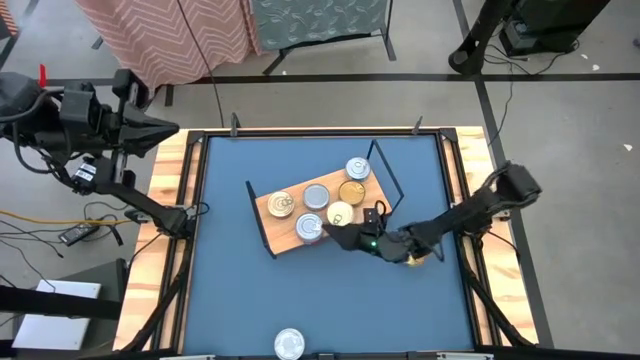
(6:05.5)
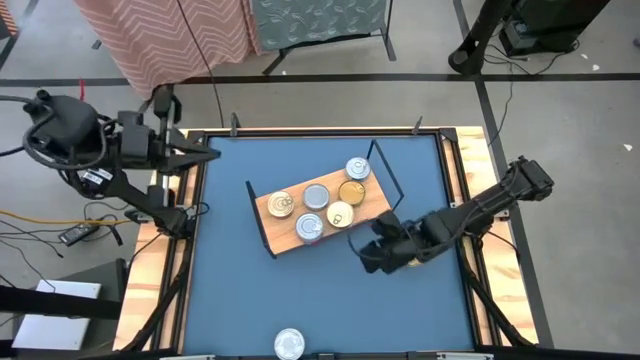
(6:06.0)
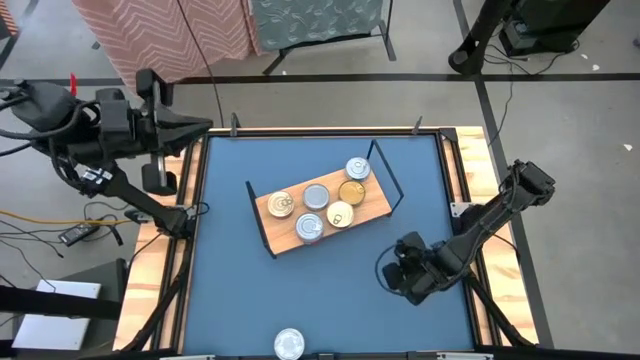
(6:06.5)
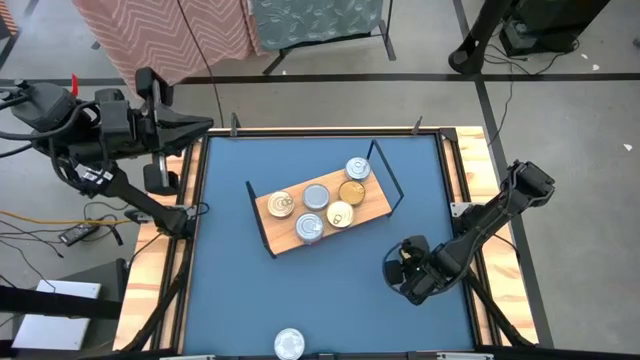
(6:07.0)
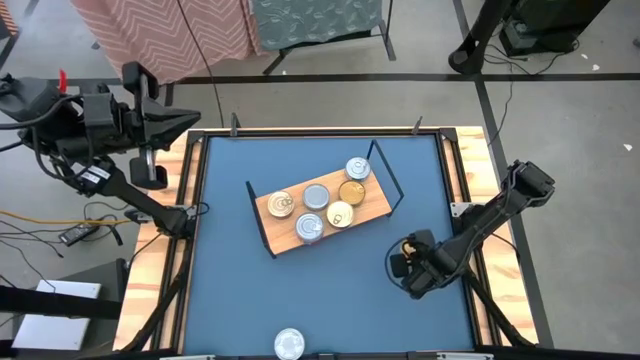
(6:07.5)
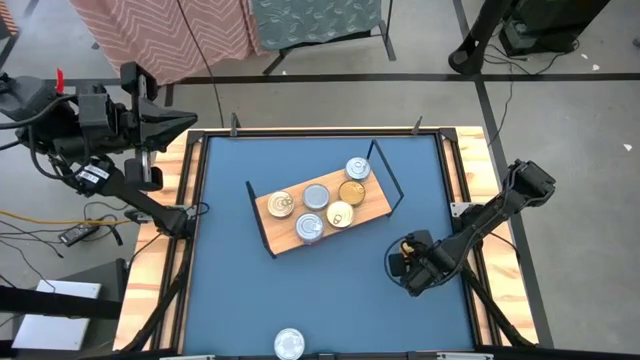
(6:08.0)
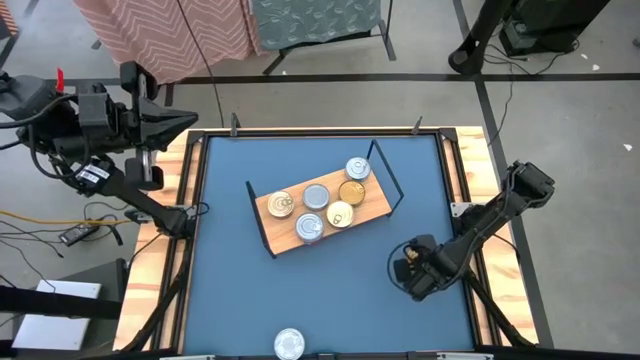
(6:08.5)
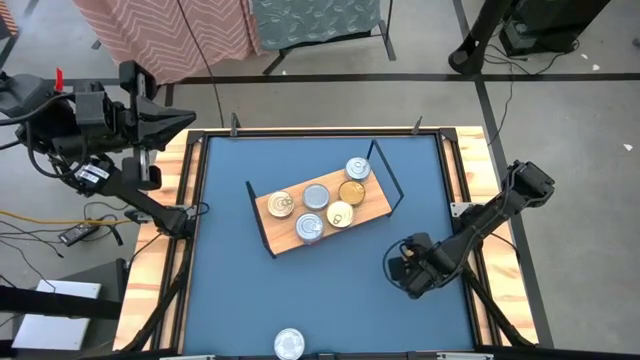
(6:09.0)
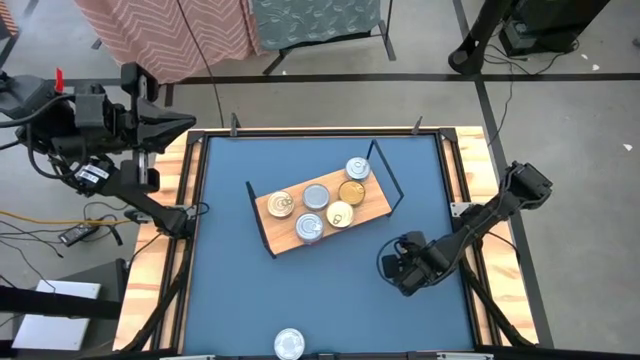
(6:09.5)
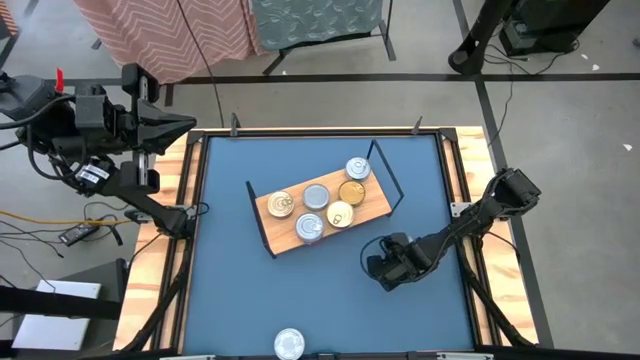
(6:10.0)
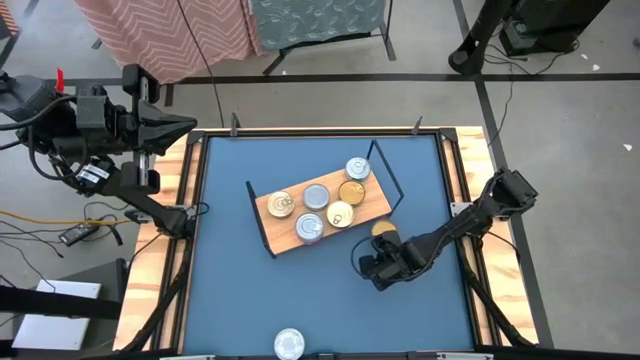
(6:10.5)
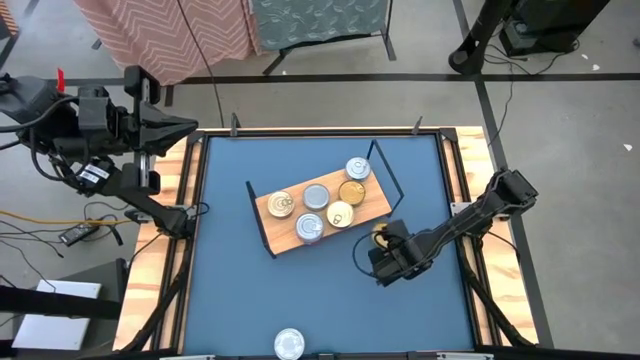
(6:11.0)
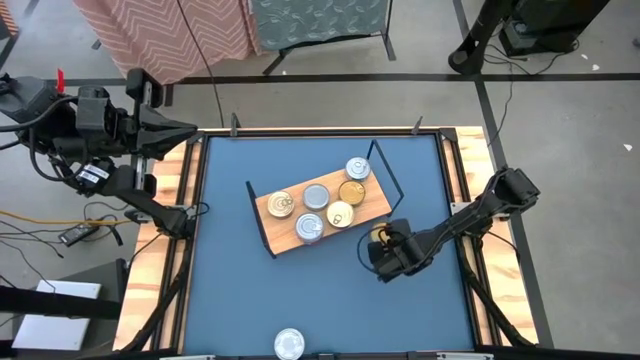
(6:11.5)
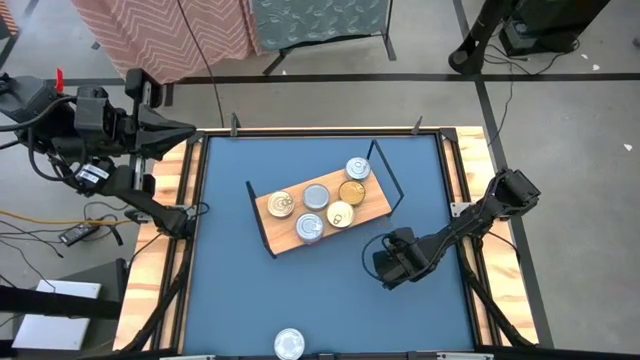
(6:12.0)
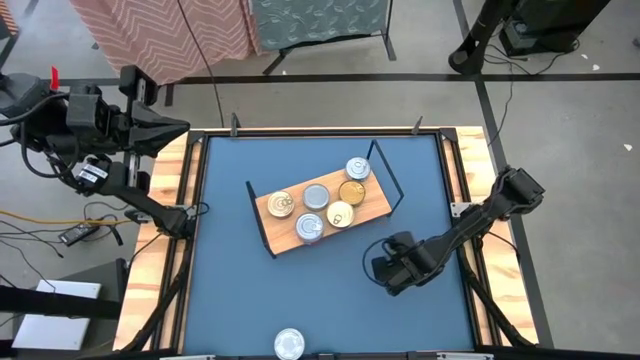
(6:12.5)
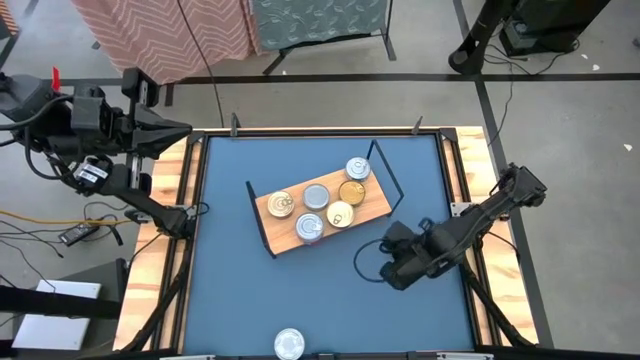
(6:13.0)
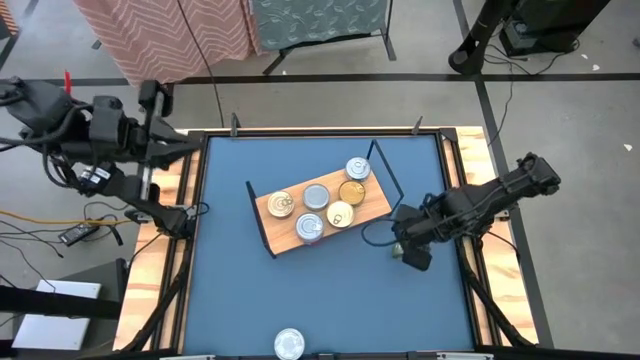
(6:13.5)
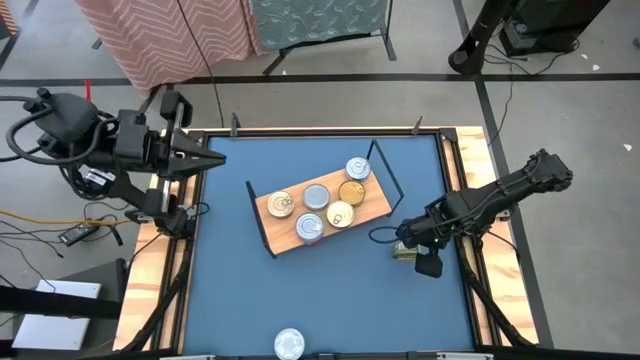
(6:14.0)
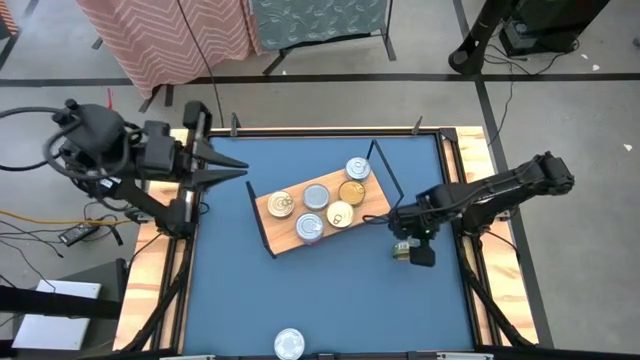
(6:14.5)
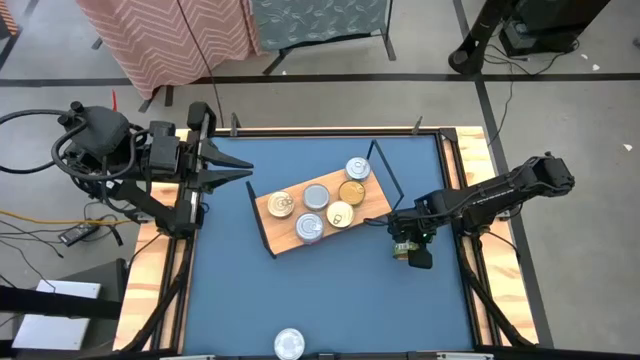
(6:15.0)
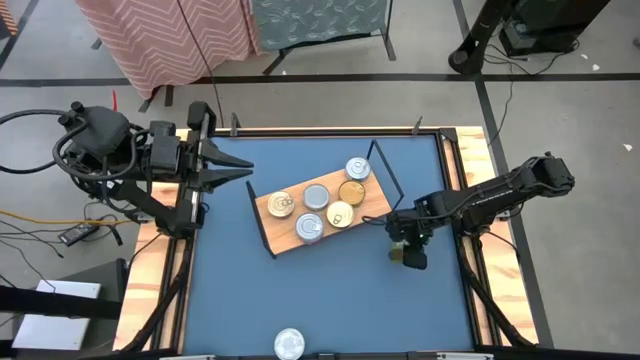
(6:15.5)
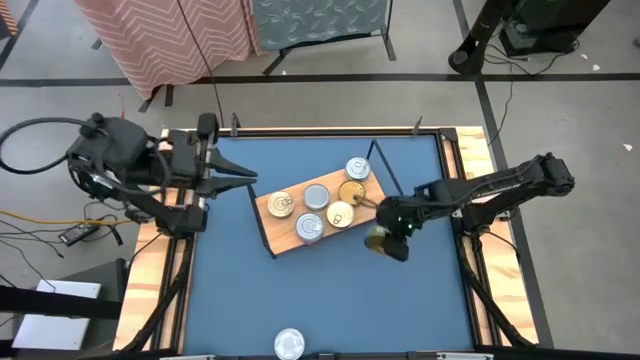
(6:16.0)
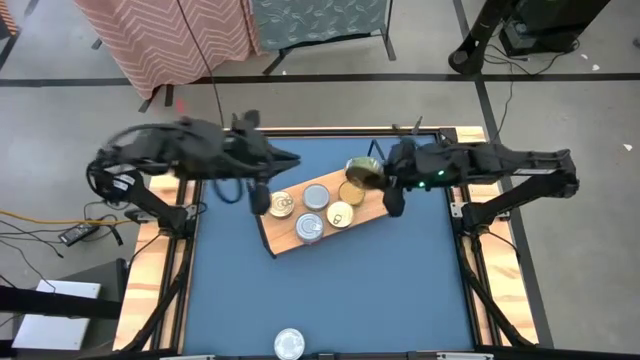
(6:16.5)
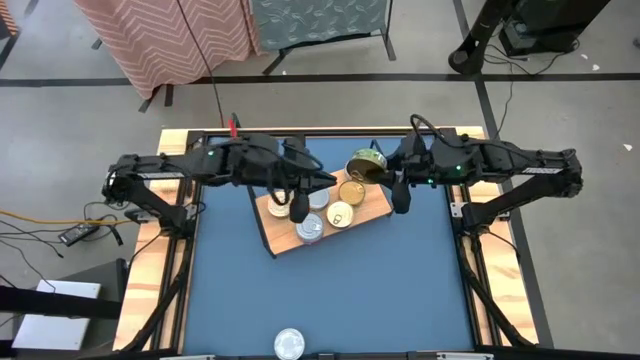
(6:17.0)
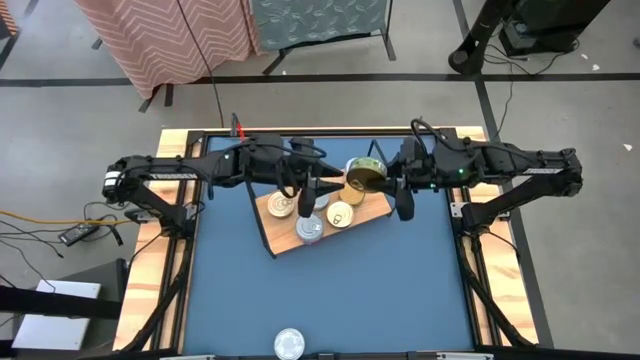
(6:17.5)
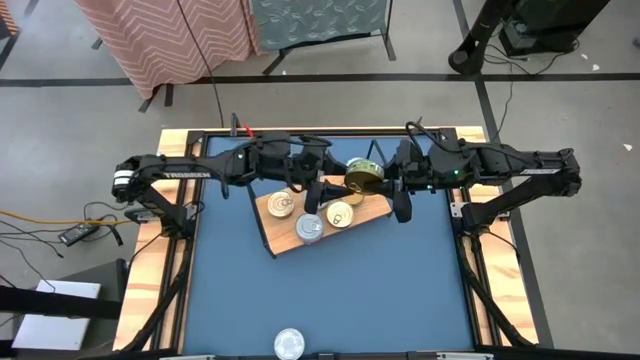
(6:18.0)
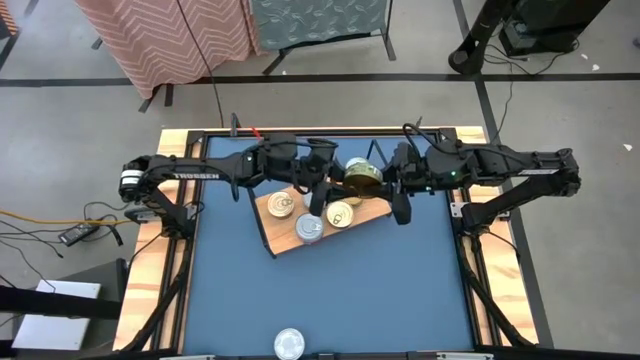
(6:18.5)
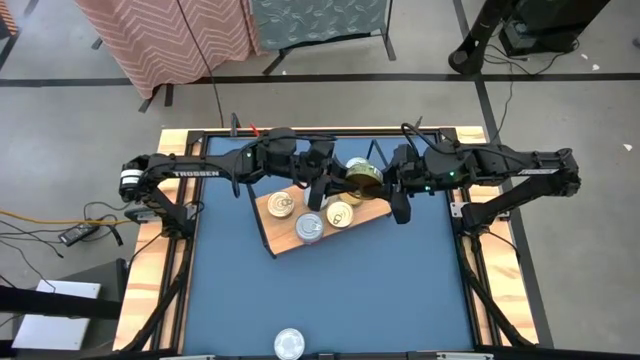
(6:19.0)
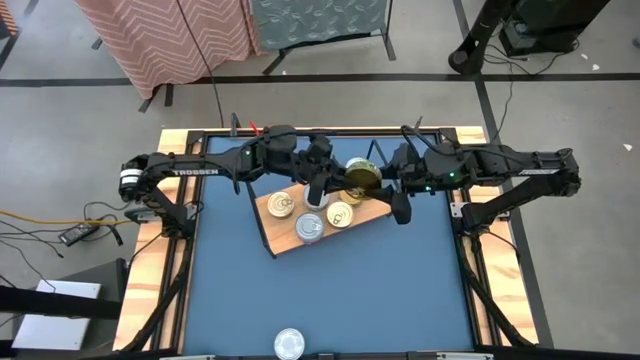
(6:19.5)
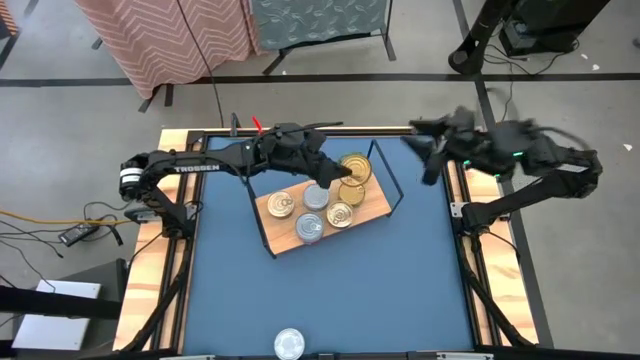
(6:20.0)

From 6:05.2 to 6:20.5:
Task: Stack canned seafood by type on shelf
Stack the green tuna can on top of the green tuna can on the shelf

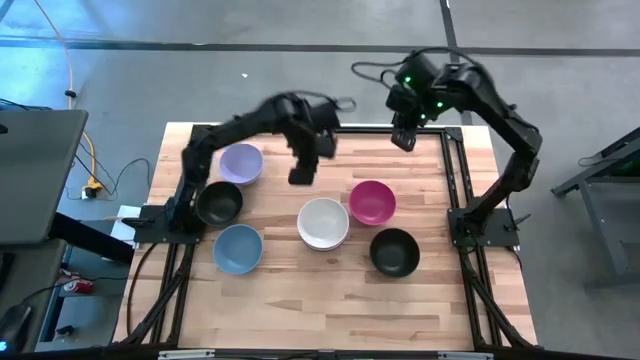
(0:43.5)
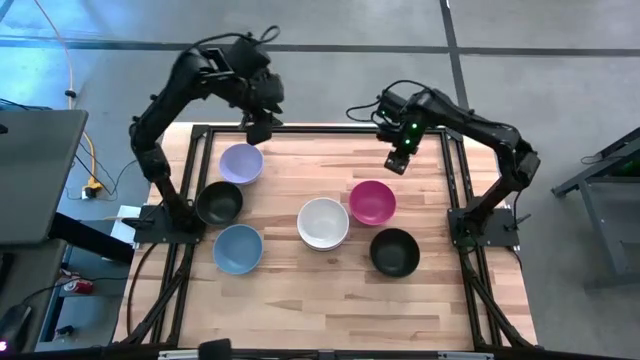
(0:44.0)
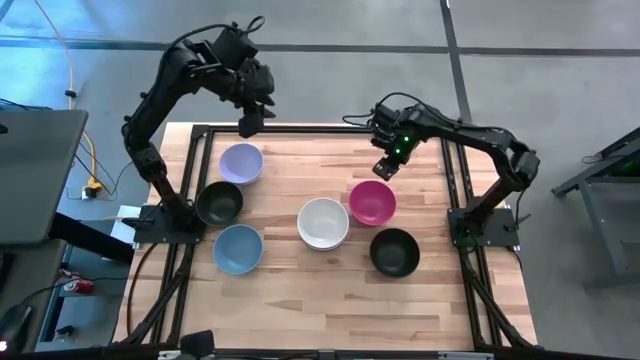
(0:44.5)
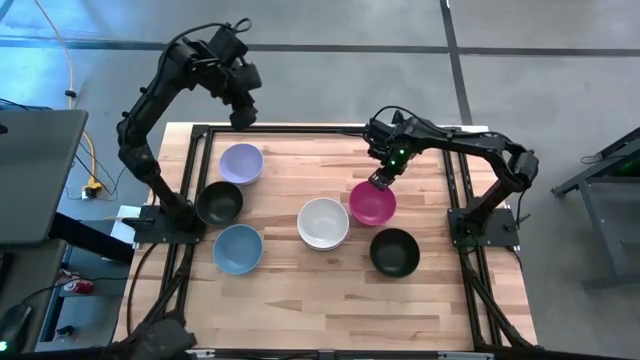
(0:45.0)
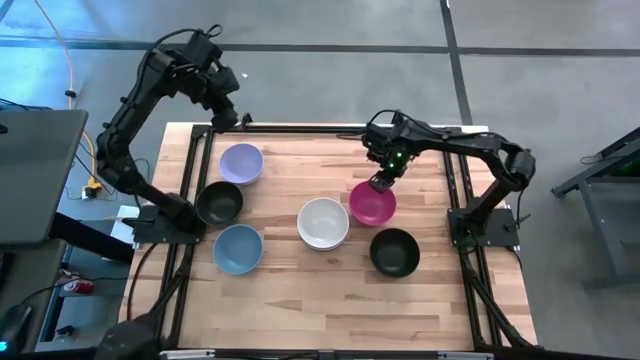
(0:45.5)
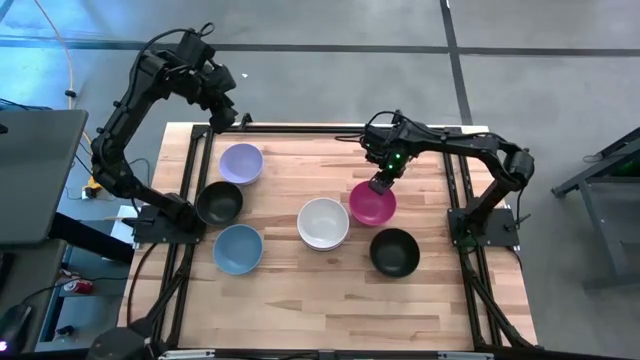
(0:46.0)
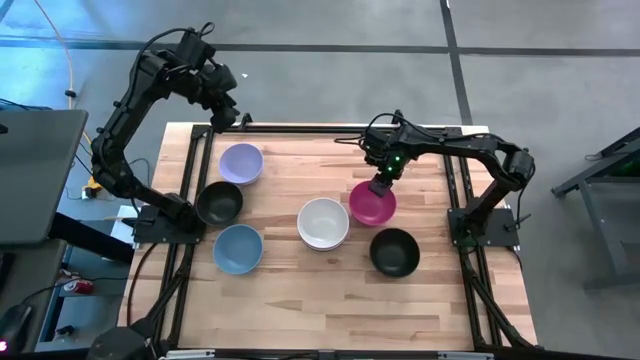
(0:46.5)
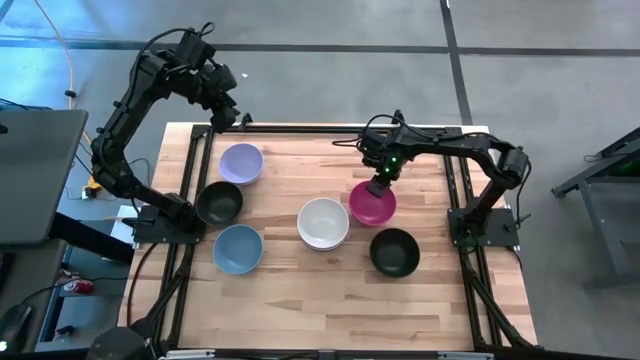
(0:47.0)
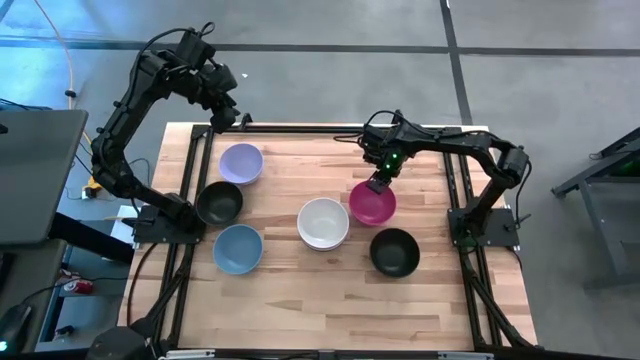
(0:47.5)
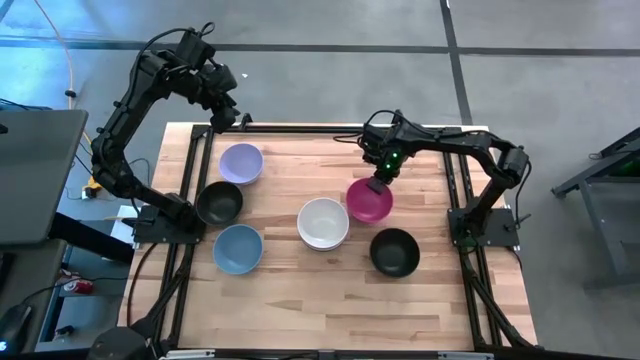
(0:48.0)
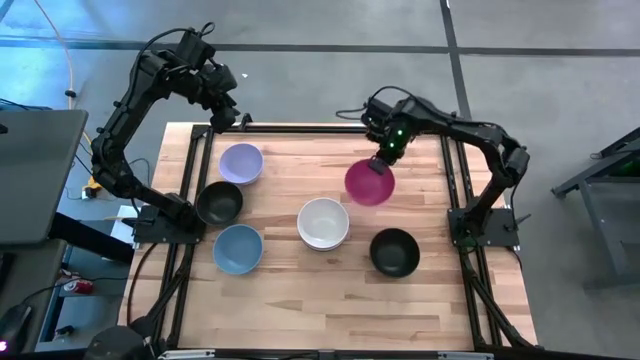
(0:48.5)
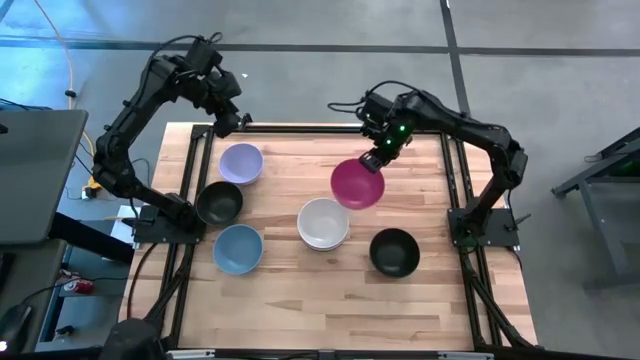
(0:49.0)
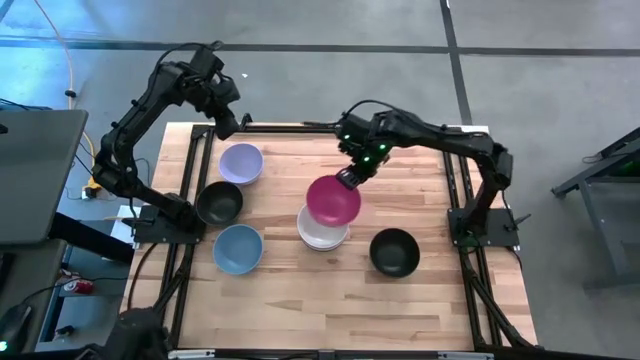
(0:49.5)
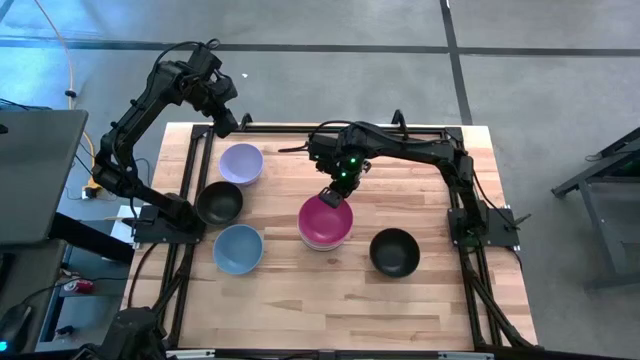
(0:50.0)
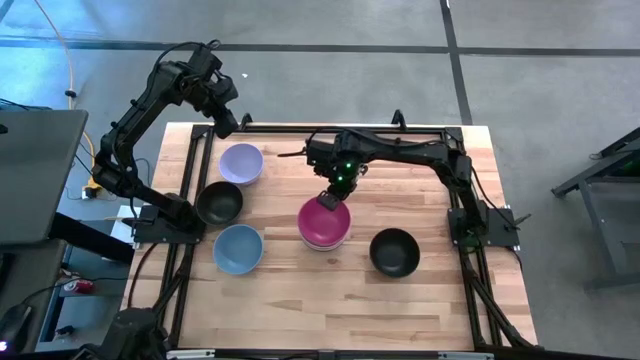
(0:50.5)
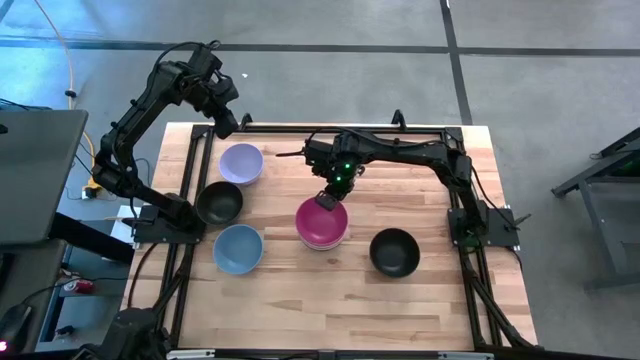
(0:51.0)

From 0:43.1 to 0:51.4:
Task: Nest bowls inside each other
Stack the pink bowl on top of the white bowl
